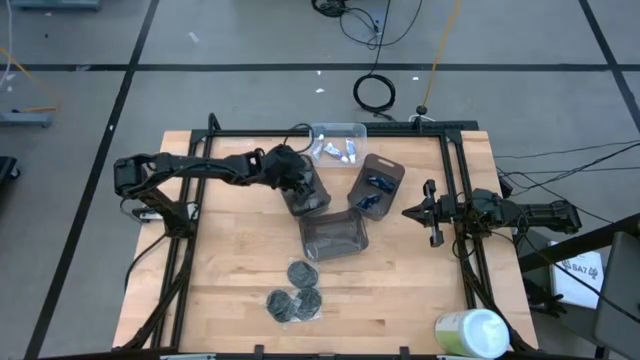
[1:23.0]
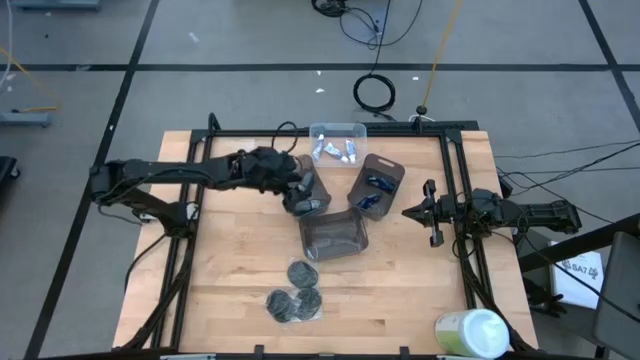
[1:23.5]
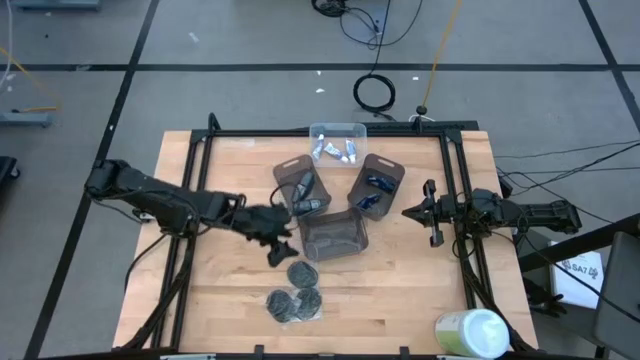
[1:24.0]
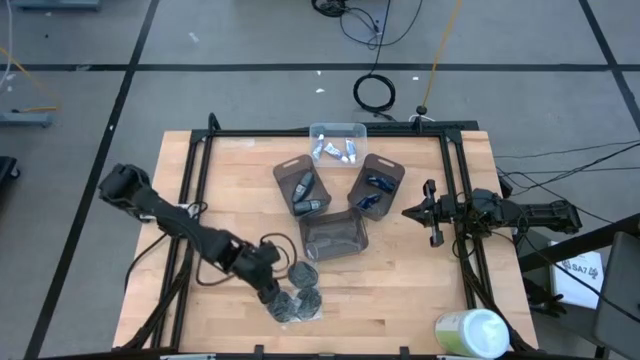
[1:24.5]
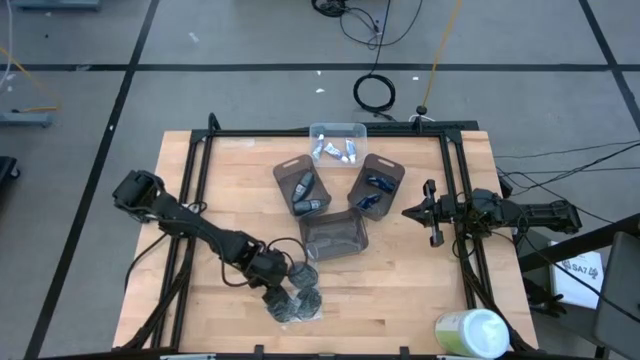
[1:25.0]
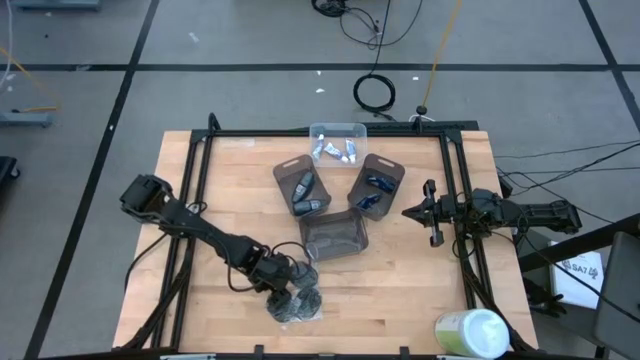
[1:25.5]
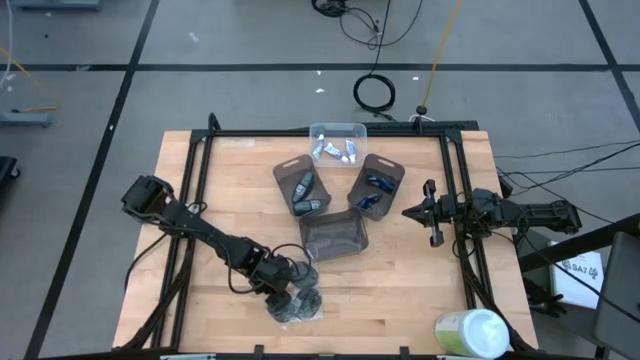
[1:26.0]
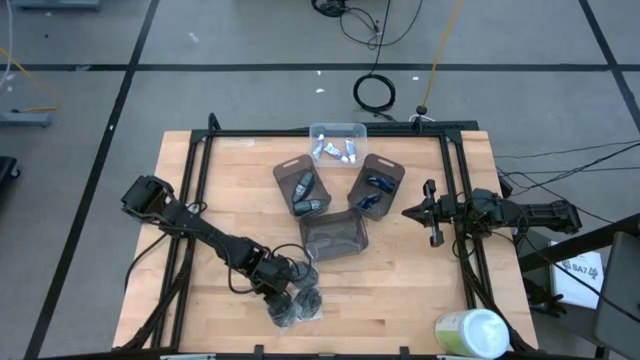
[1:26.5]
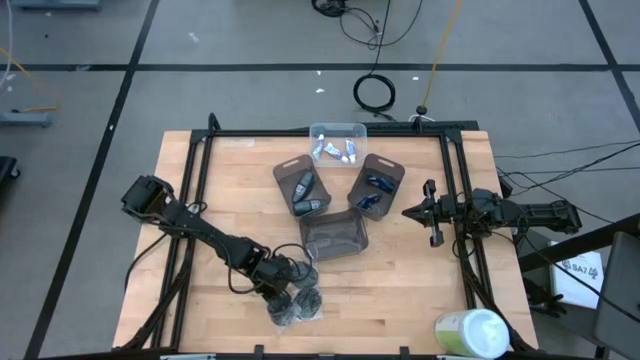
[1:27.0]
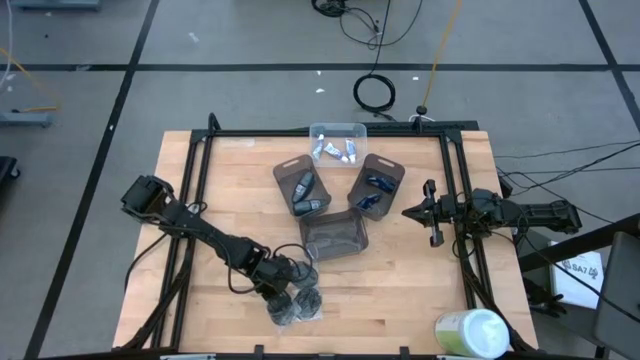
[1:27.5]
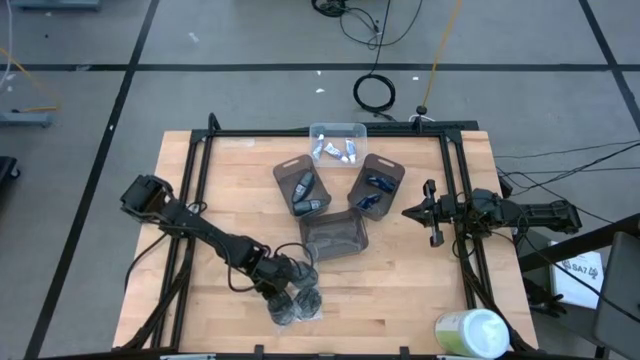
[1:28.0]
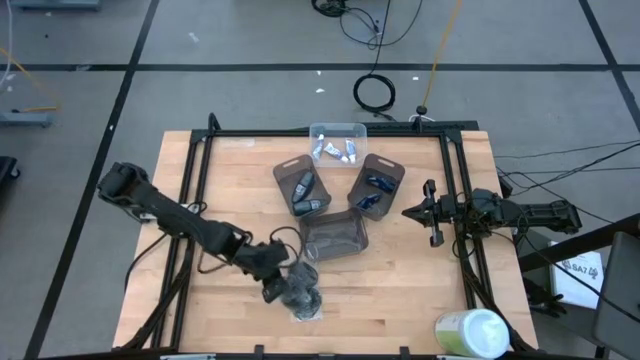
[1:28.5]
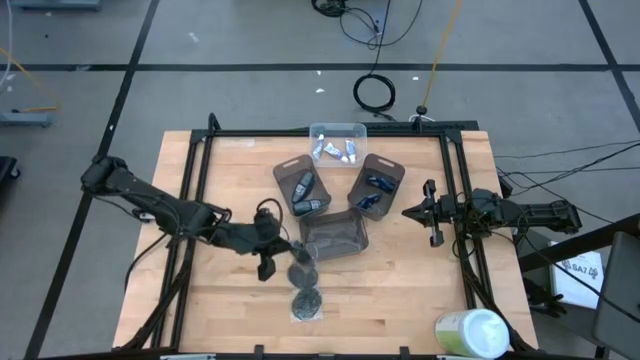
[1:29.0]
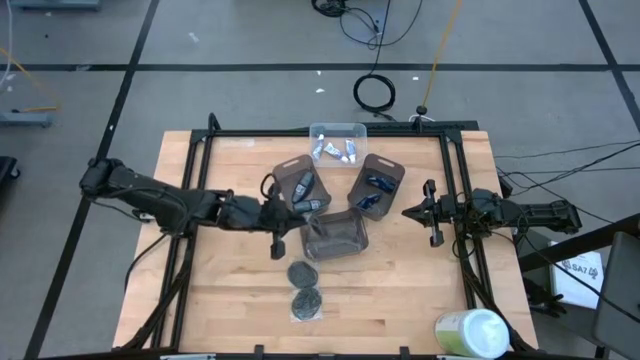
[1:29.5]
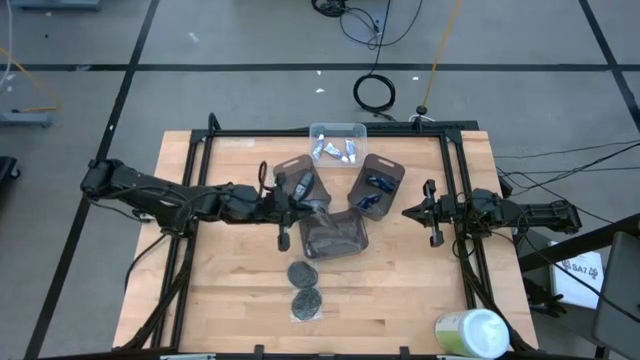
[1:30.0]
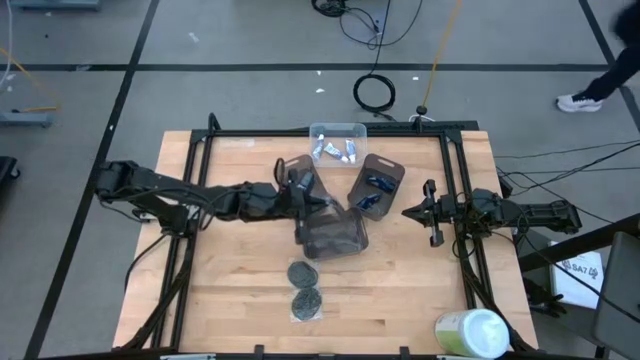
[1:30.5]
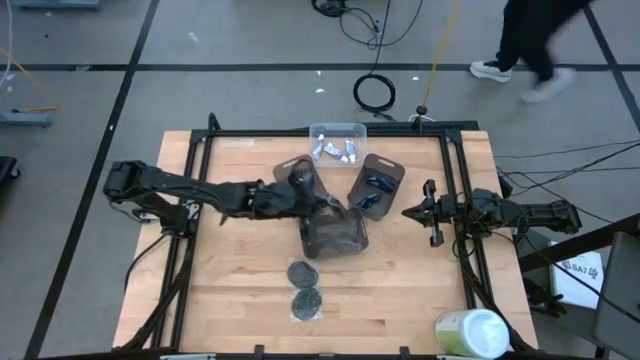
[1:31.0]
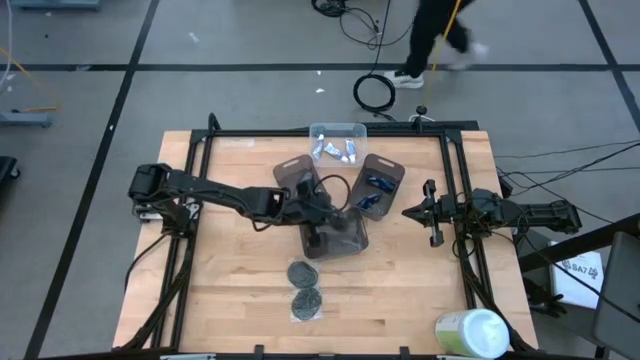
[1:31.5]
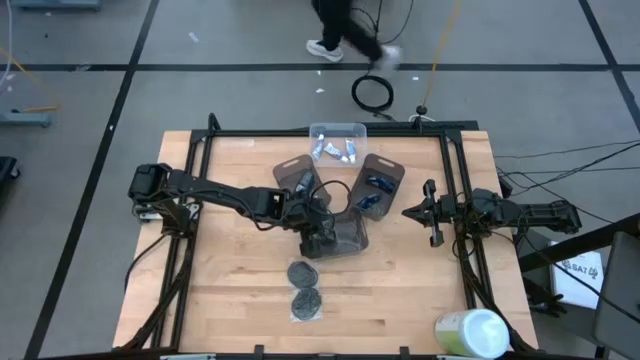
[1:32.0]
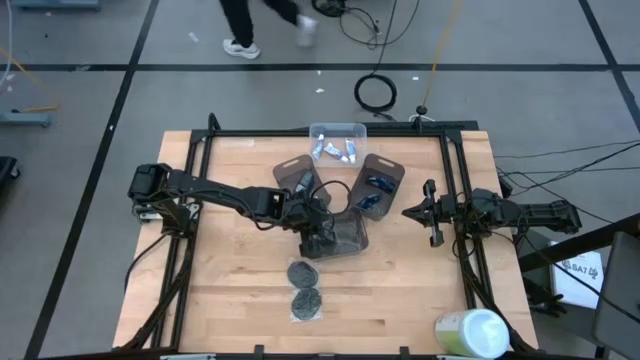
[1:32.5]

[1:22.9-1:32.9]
Task: Pick & Place Travel size toiletries
Put the bottom left black hairbrush into the bottom black transparent bin

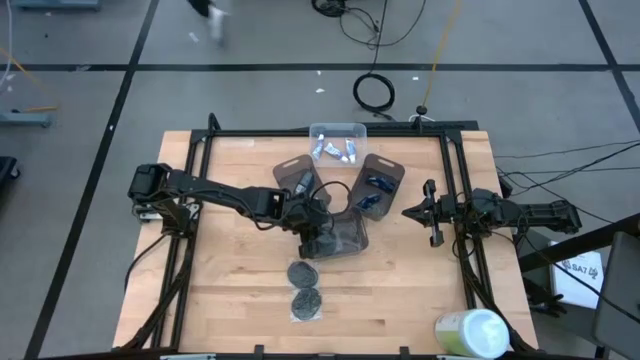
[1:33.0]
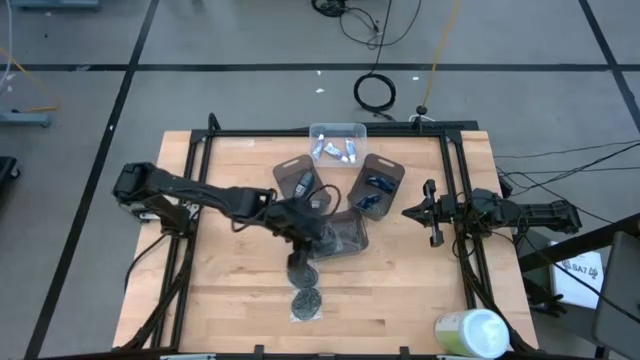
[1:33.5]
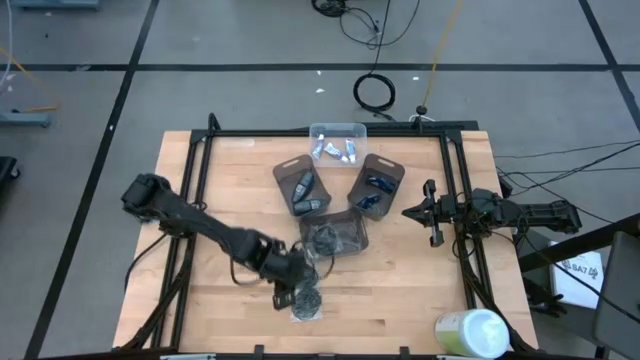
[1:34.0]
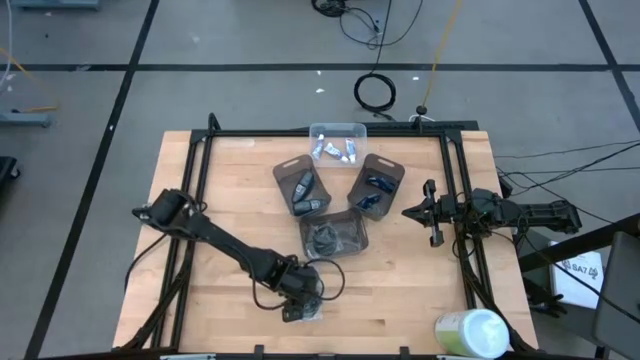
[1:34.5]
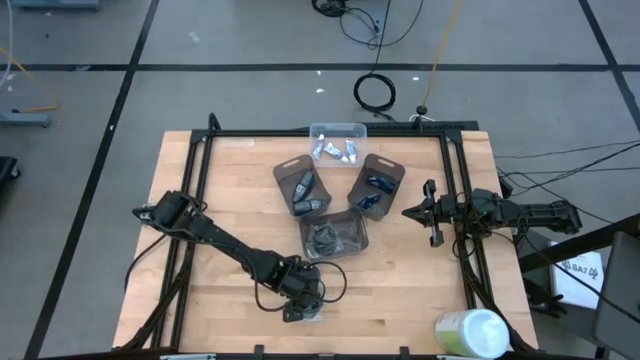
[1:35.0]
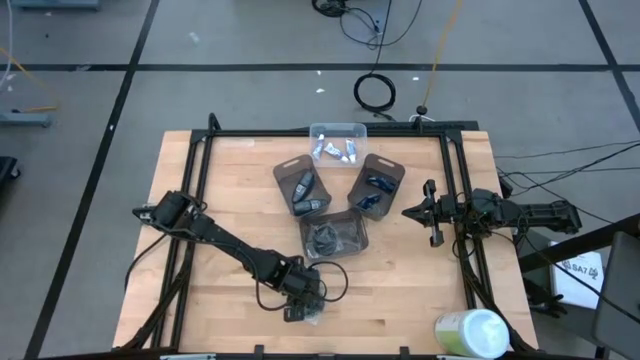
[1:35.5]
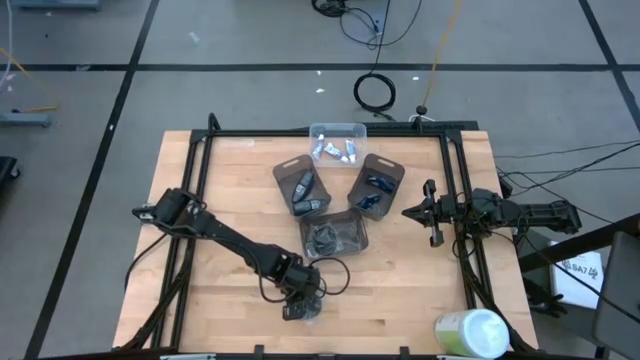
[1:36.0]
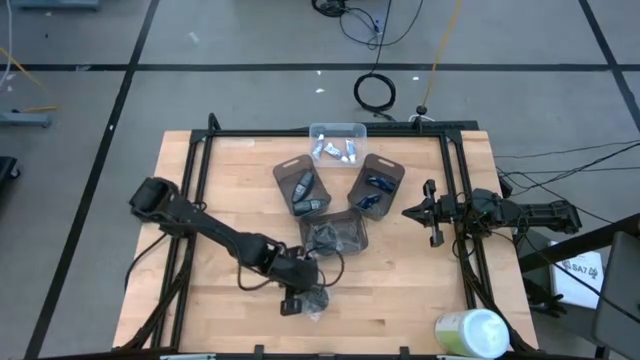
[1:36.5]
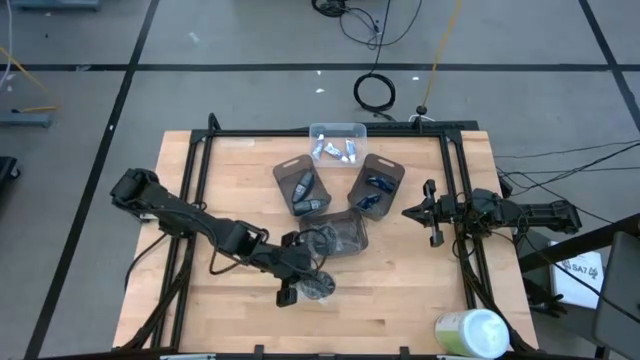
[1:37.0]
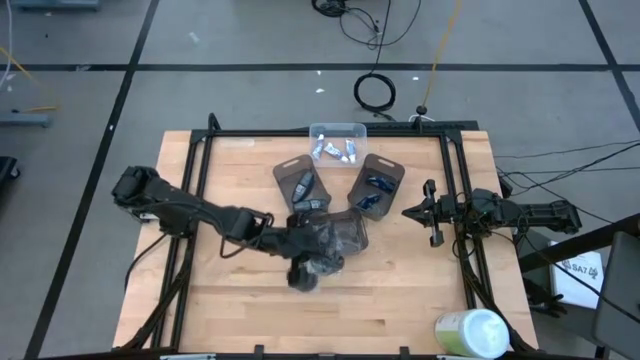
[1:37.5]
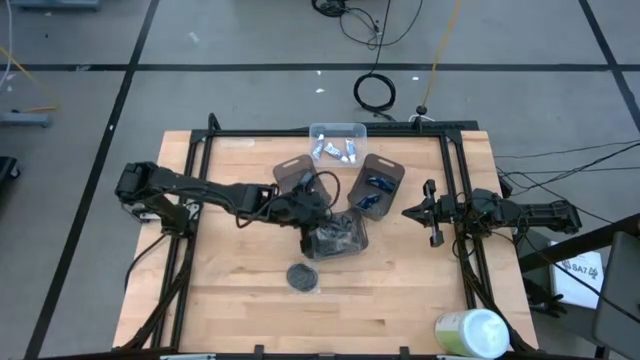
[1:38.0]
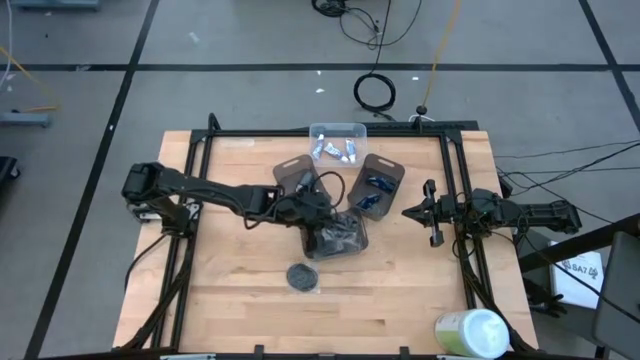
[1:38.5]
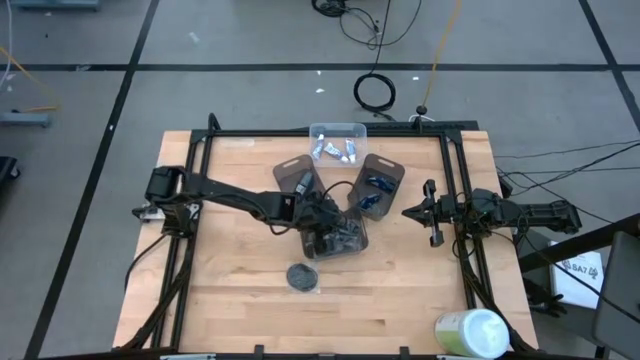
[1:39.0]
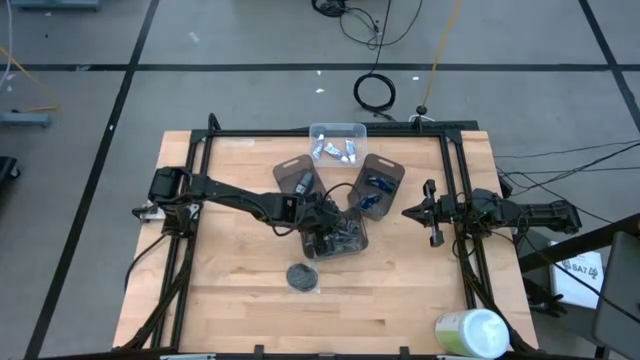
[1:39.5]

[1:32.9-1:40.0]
Put the bottom black hairbrush into the bottom black transparent bin

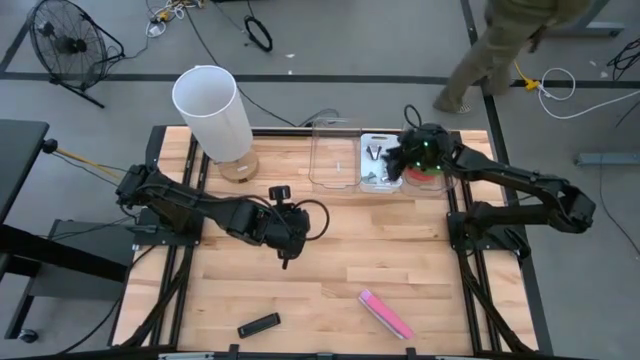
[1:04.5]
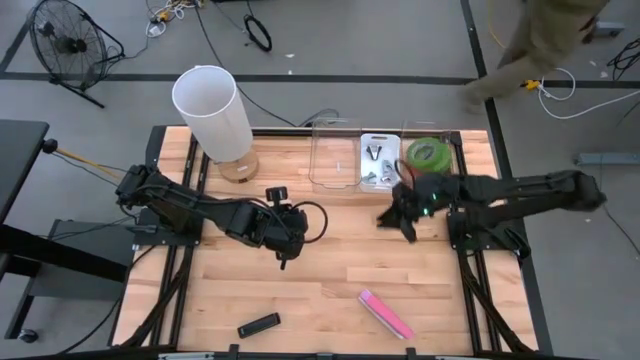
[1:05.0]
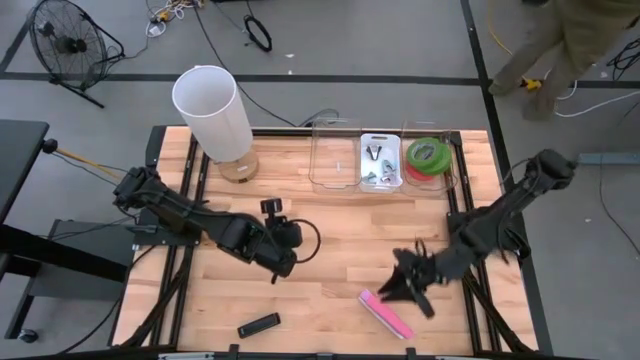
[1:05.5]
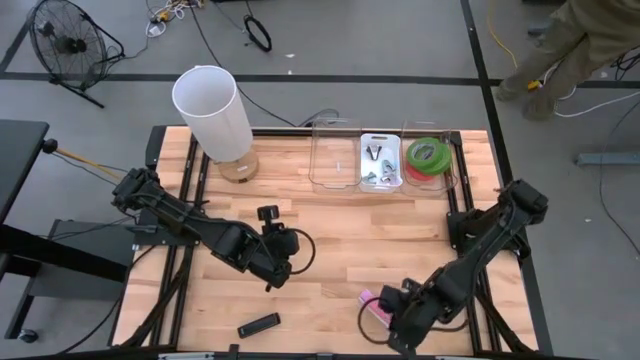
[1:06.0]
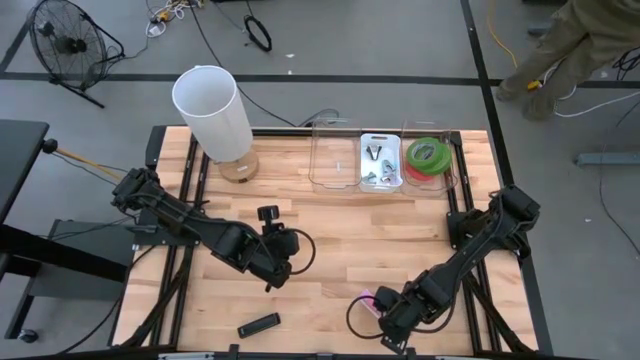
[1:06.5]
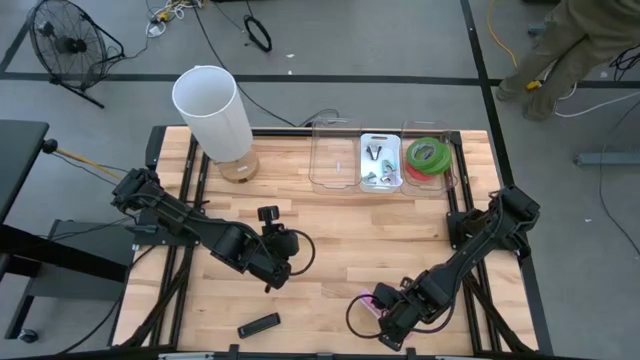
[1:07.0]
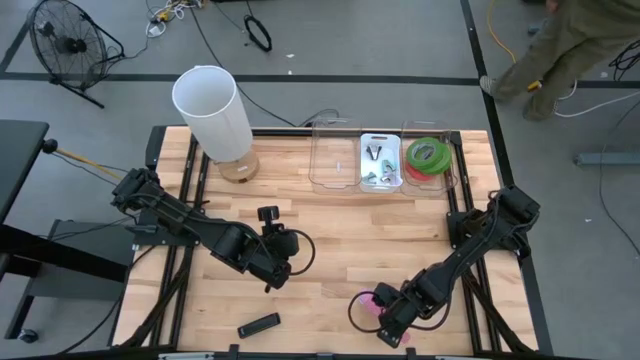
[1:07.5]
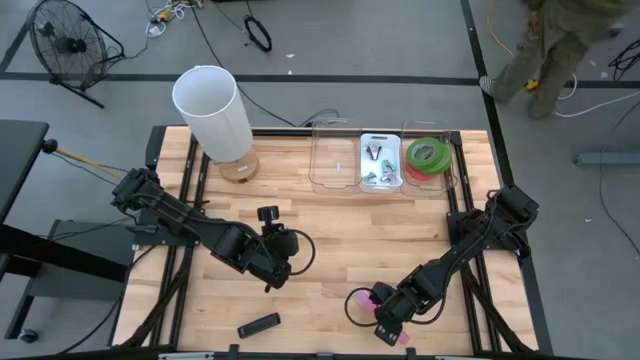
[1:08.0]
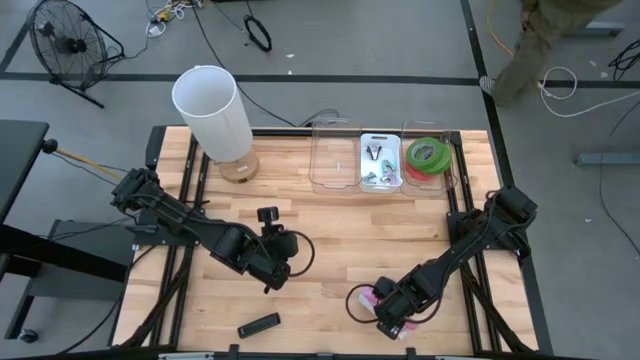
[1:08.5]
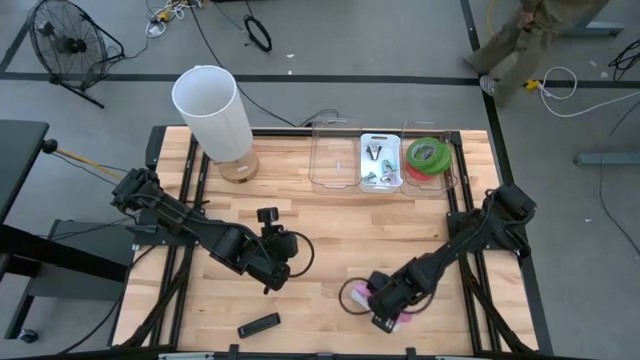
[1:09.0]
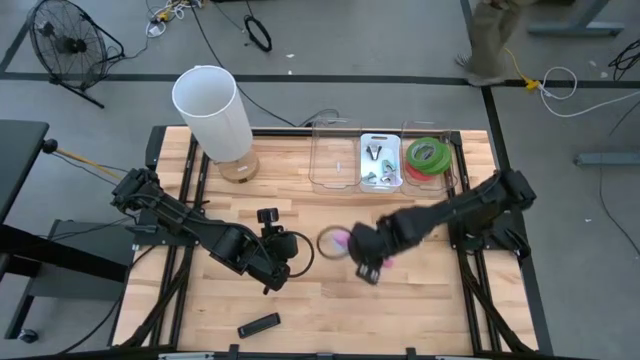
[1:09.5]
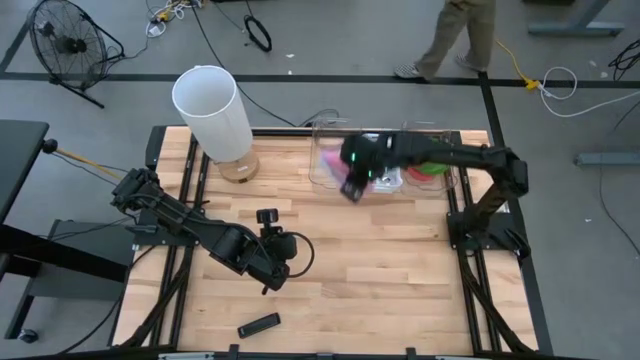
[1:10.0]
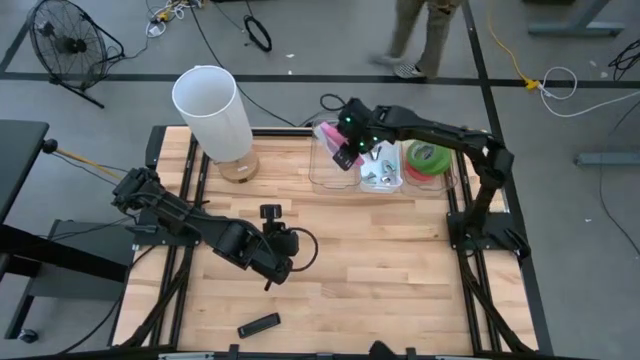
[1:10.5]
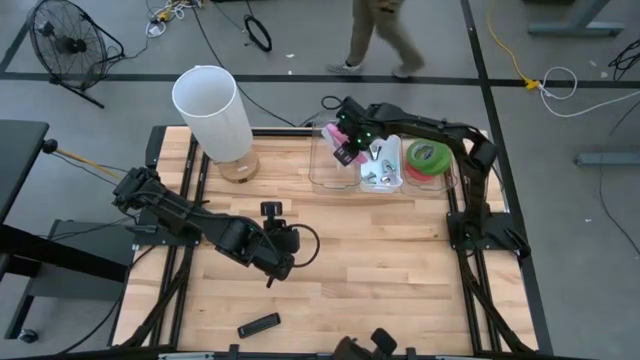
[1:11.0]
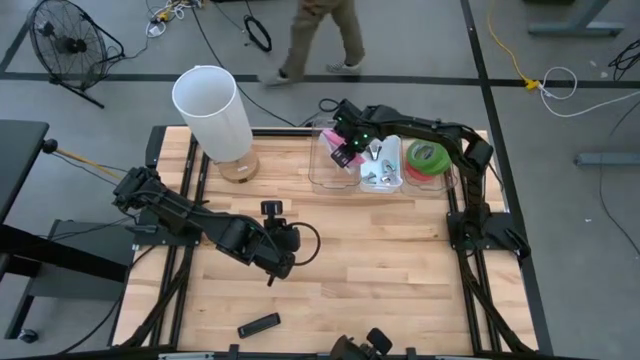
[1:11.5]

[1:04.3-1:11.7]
Task: Pick and place Stapler, Stapler remover, tape
Put the pink stapler into the left transparent bin
